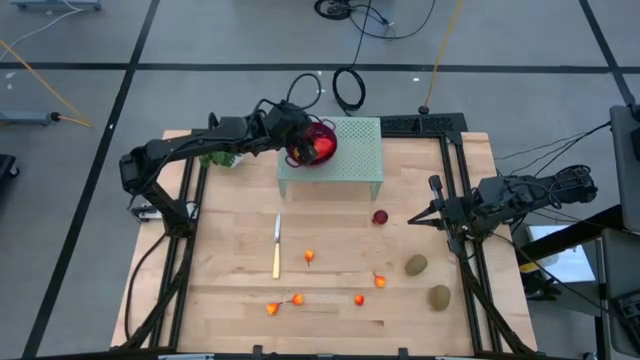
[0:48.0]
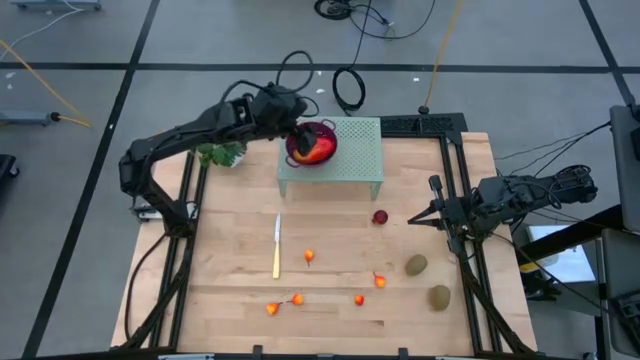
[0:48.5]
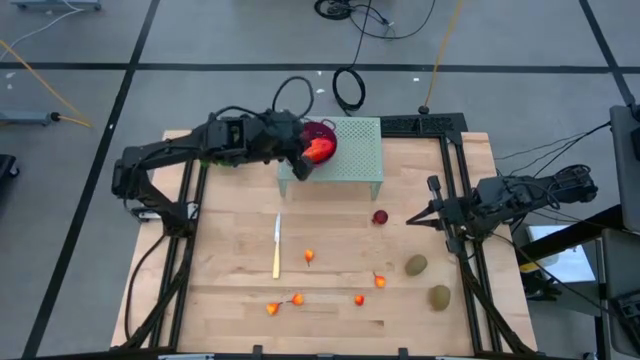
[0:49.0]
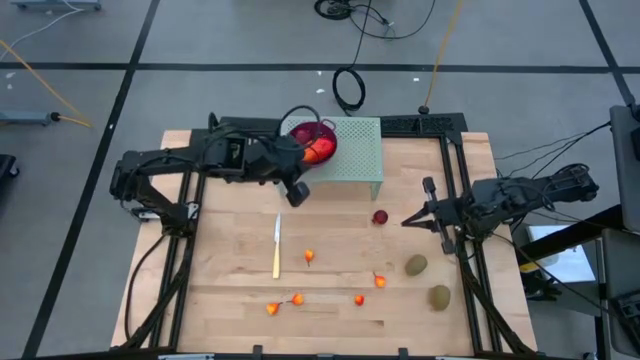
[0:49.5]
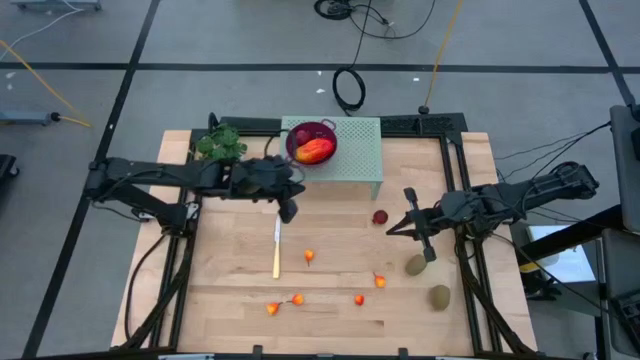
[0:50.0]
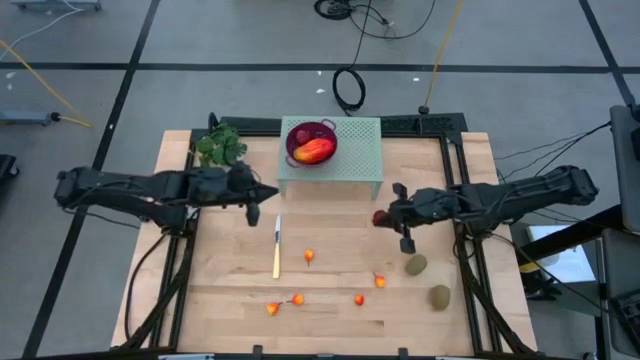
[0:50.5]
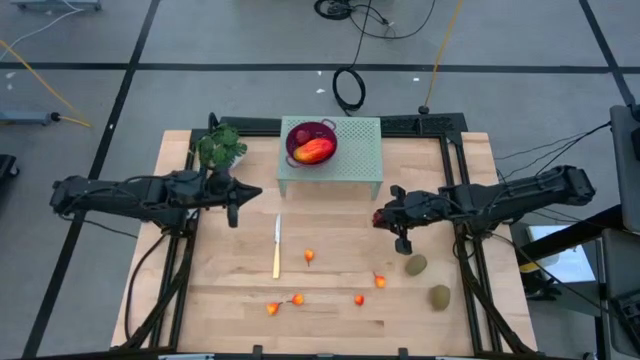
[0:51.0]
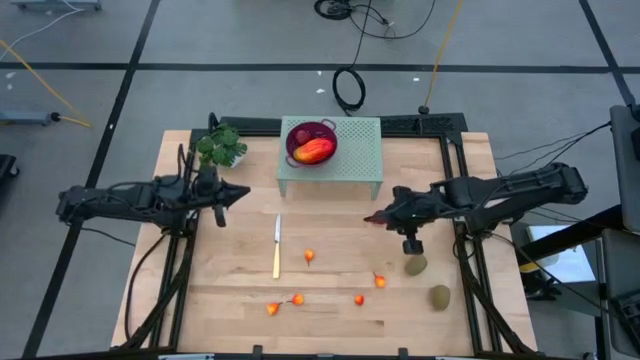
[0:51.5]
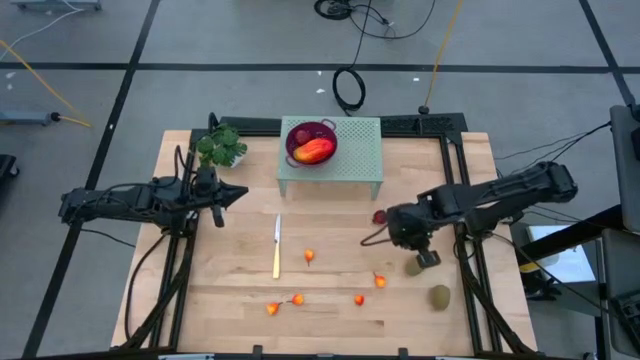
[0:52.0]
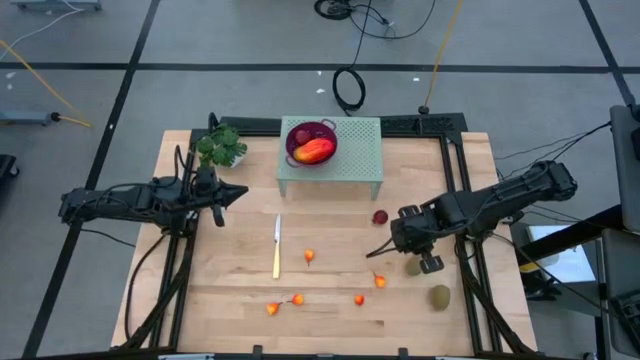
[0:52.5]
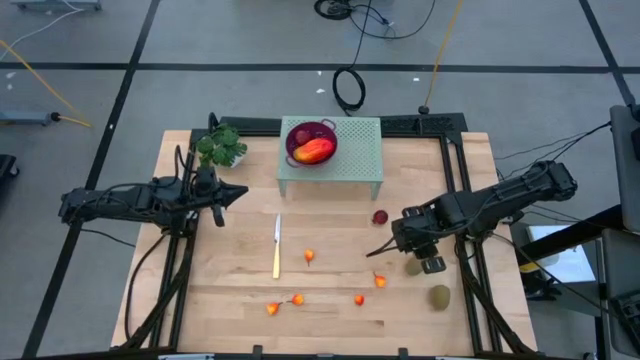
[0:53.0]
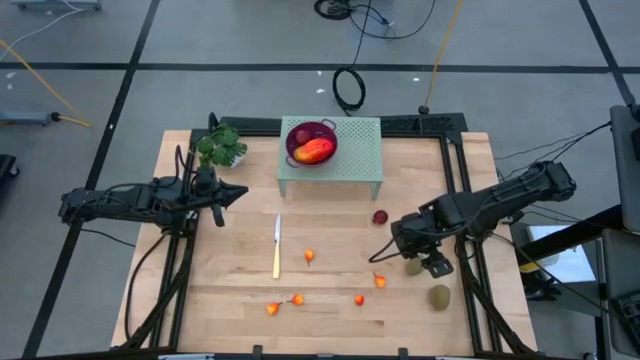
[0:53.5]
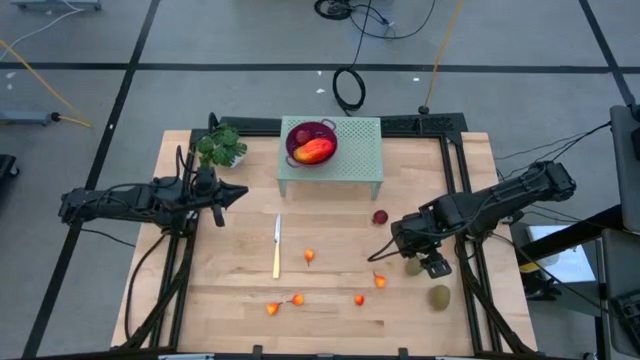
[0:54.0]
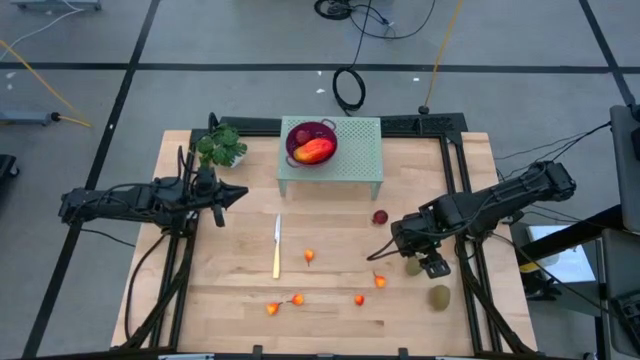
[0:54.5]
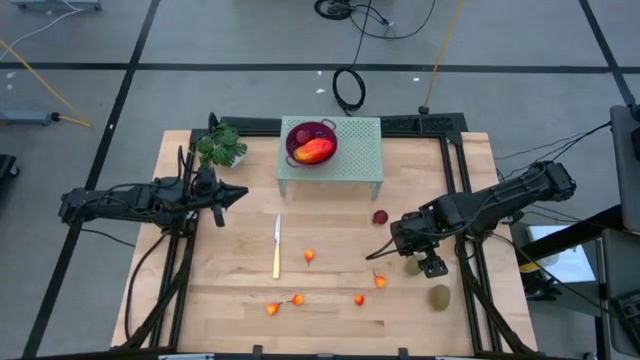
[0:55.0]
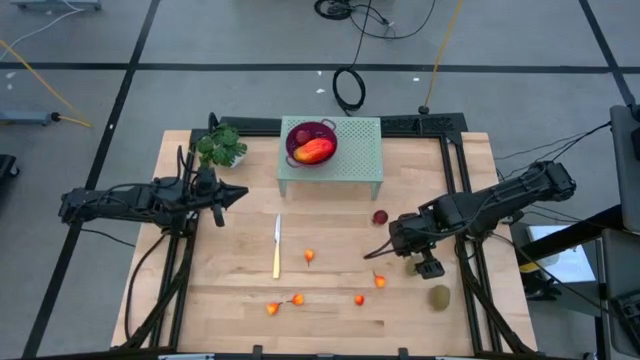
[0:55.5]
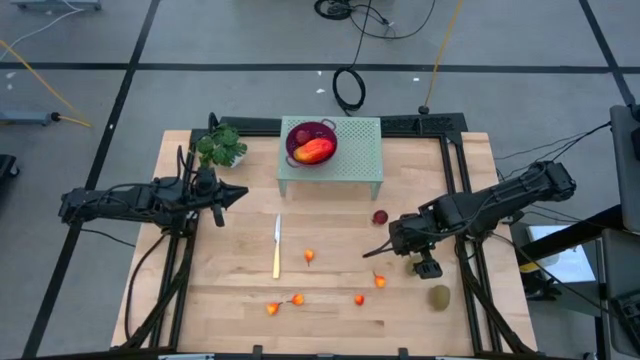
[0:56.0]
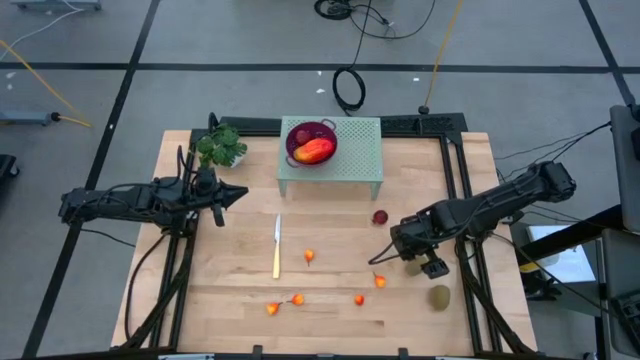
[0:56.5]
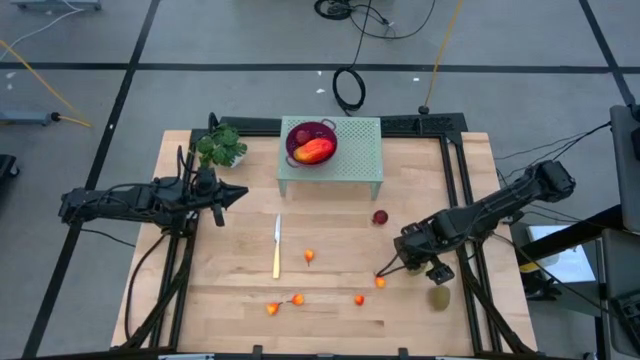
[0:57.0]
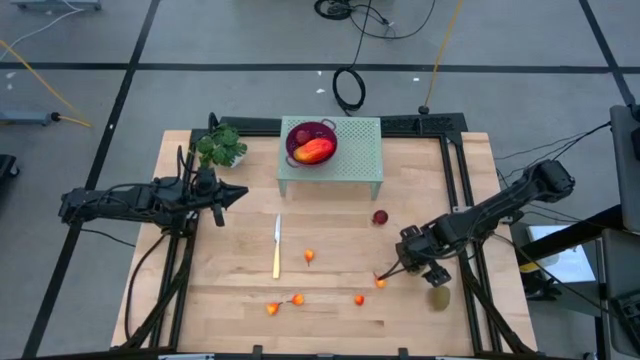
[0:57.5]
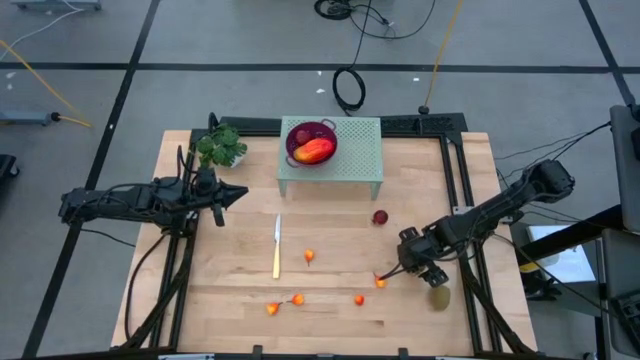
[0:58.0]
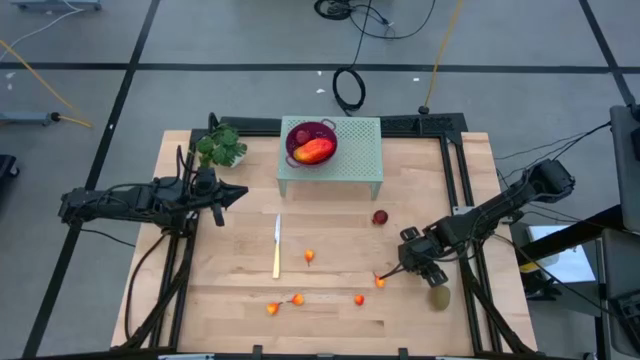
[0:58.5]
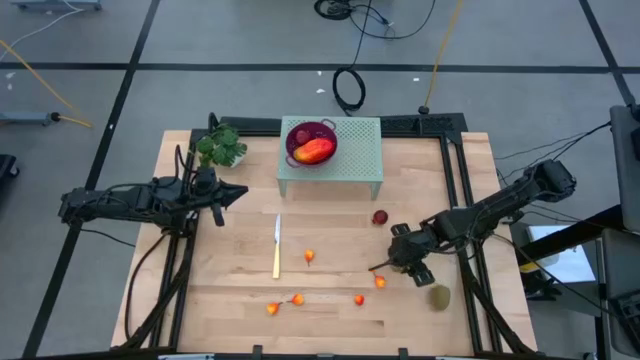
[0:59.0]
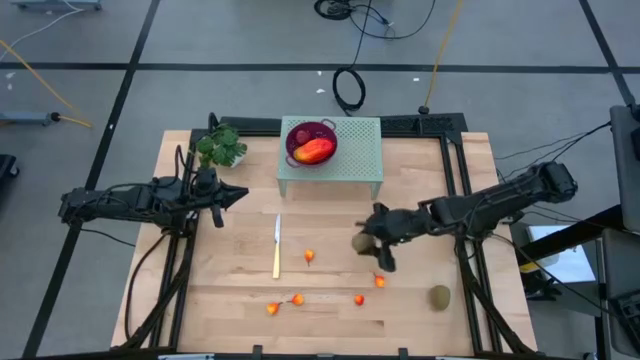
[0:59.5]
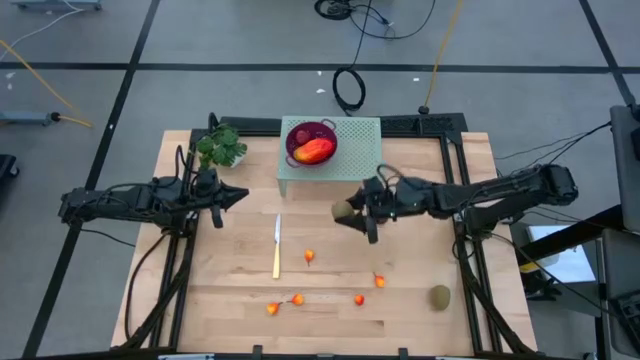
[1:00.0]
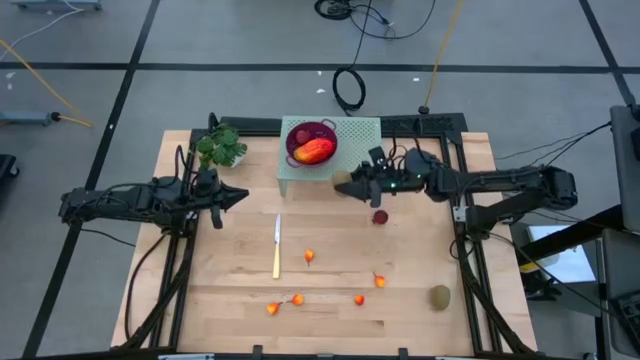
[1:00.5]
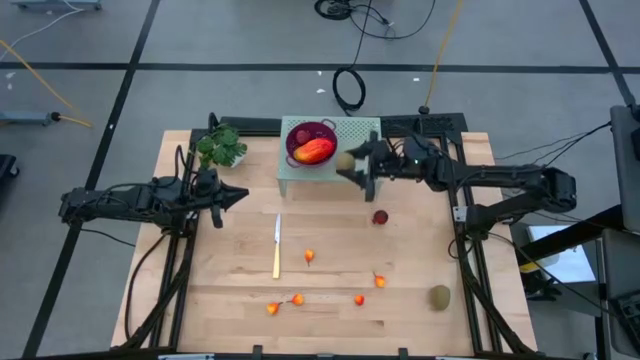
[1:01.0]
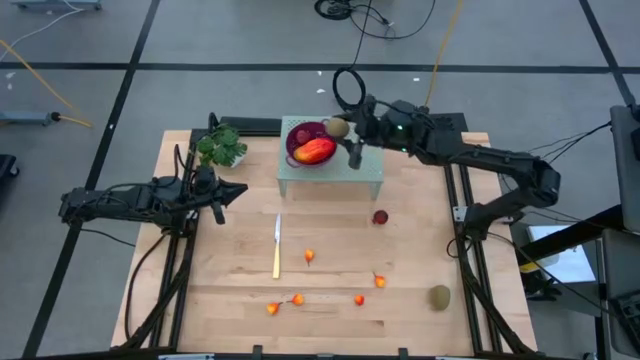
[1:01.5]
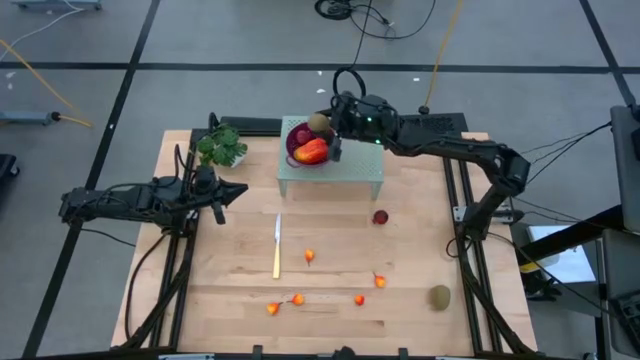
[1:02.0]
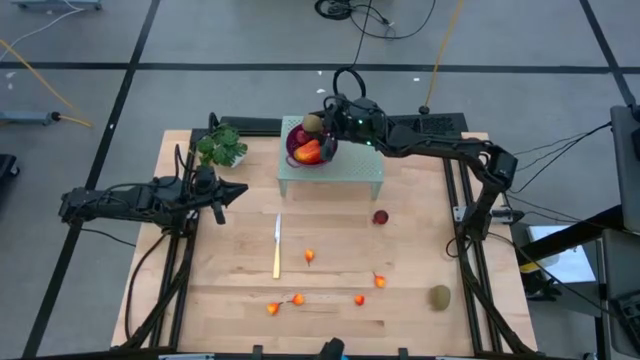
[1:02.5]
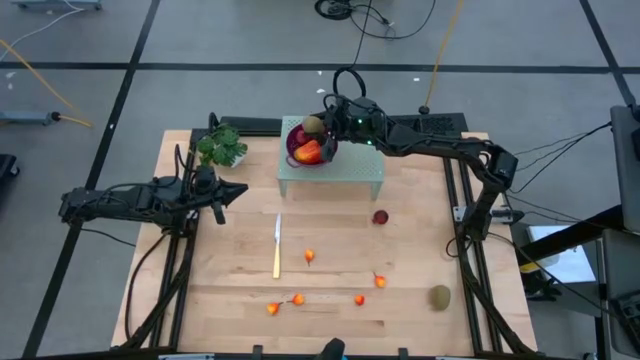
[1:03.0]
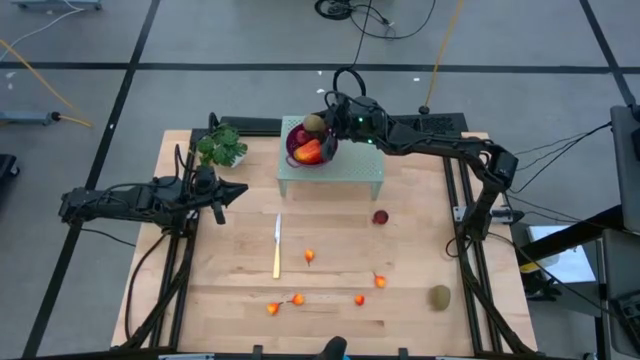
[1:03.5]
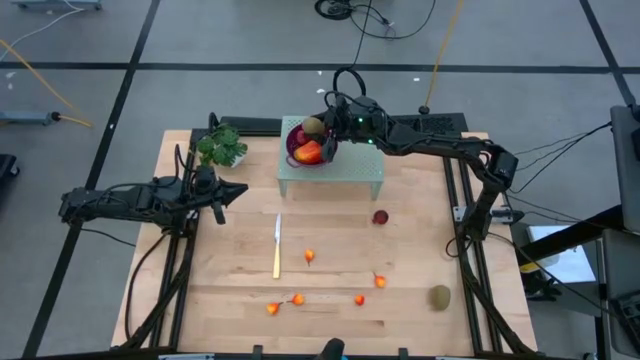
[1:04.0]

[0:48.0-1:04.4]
Task: Pick & Place Fruit
Put the kiwi into the strainer bowl on the shelf
